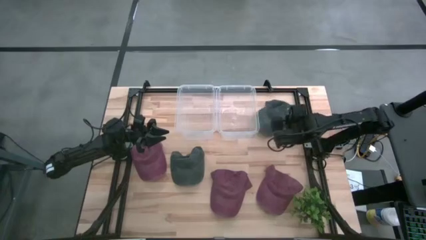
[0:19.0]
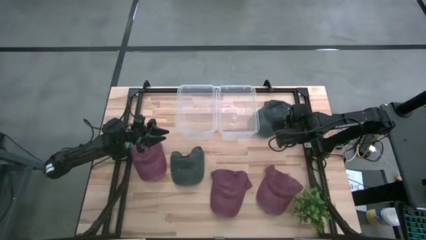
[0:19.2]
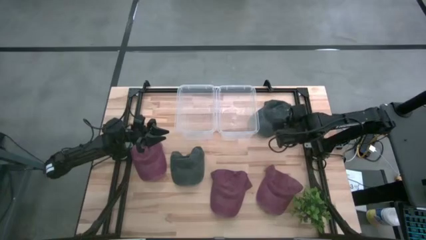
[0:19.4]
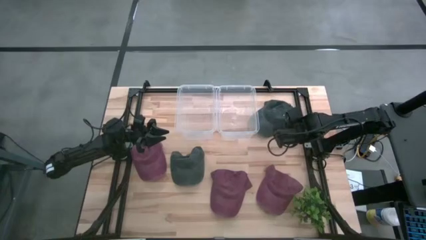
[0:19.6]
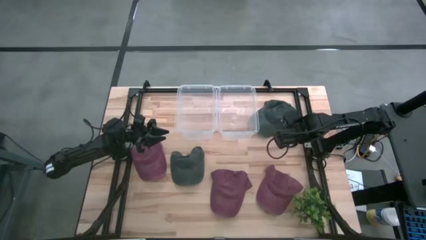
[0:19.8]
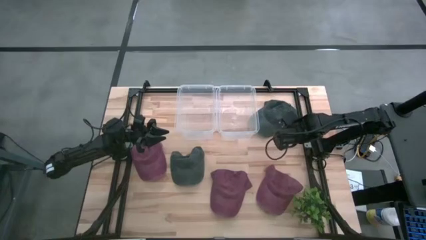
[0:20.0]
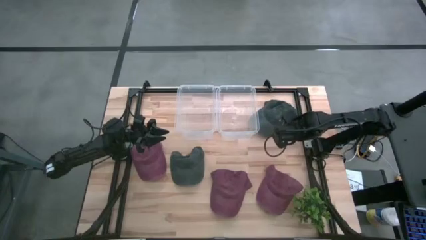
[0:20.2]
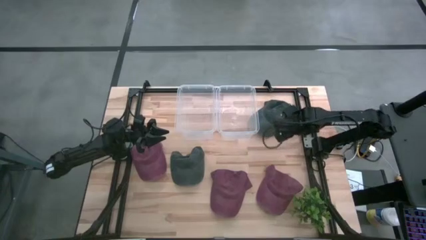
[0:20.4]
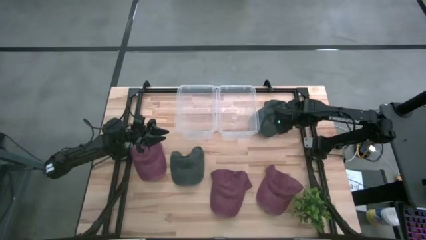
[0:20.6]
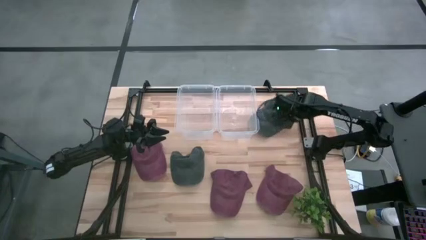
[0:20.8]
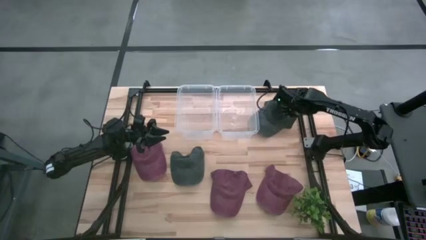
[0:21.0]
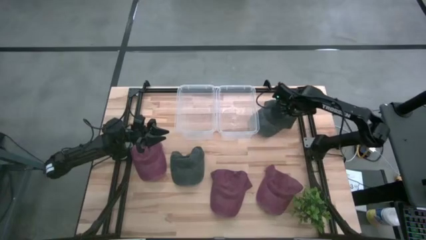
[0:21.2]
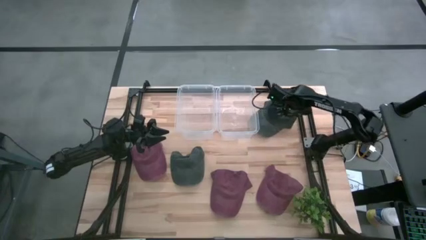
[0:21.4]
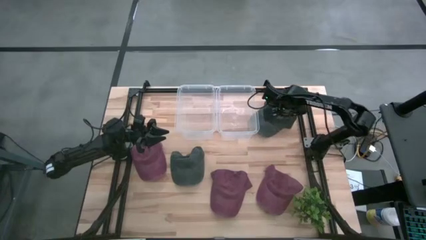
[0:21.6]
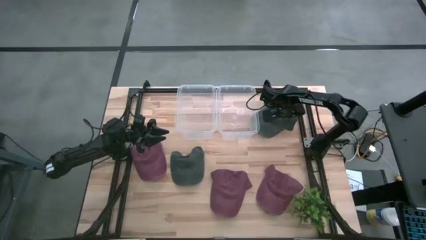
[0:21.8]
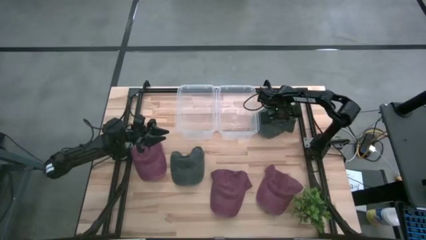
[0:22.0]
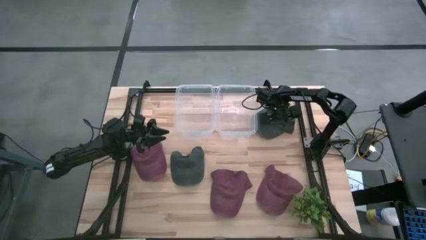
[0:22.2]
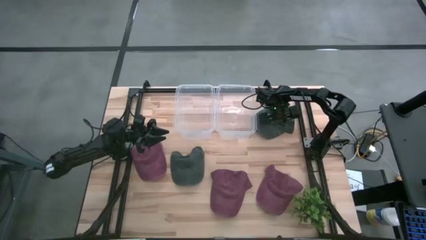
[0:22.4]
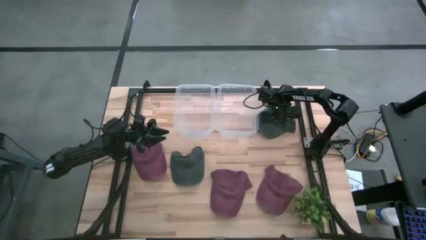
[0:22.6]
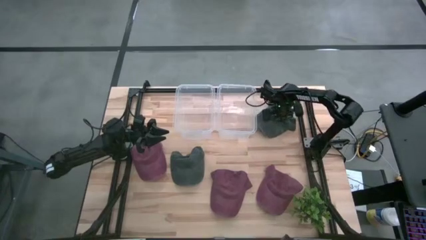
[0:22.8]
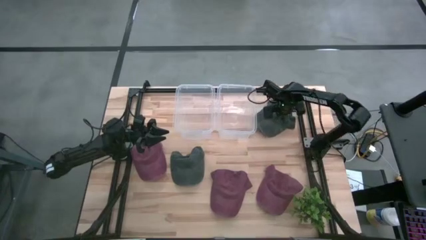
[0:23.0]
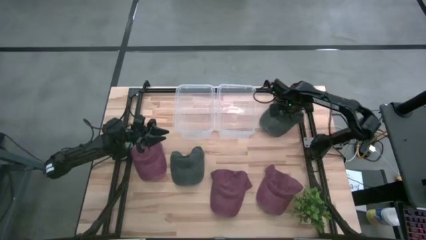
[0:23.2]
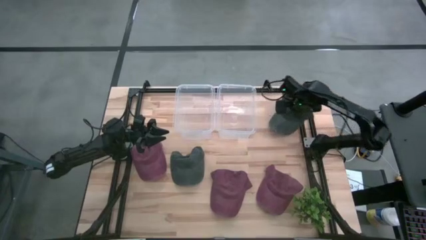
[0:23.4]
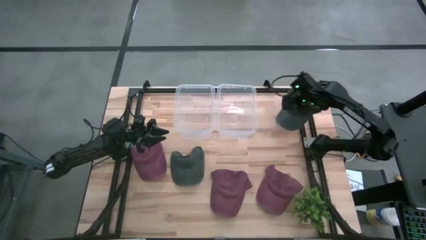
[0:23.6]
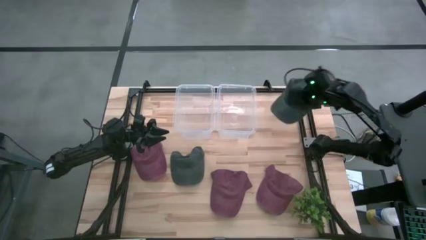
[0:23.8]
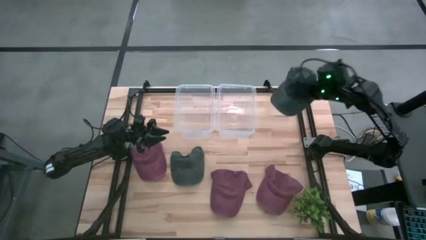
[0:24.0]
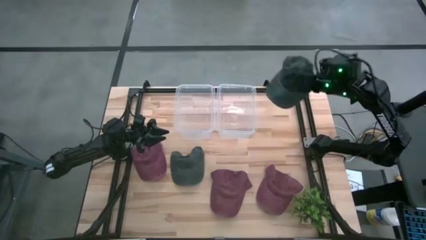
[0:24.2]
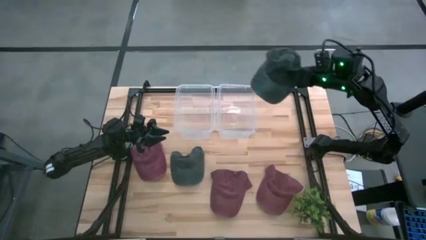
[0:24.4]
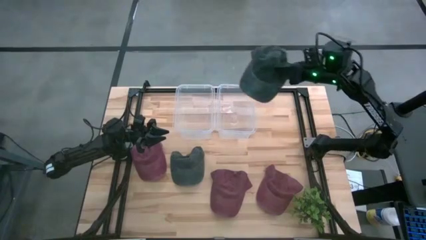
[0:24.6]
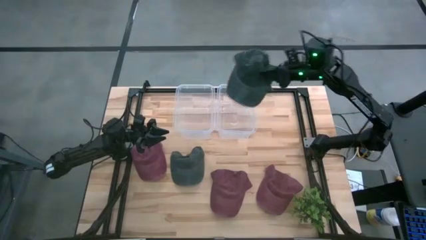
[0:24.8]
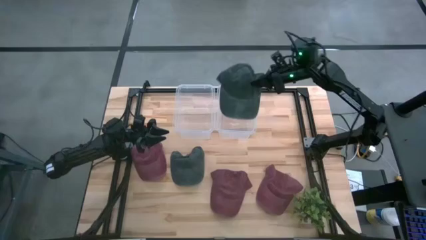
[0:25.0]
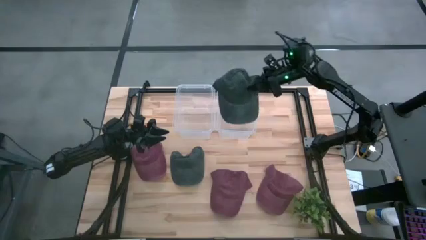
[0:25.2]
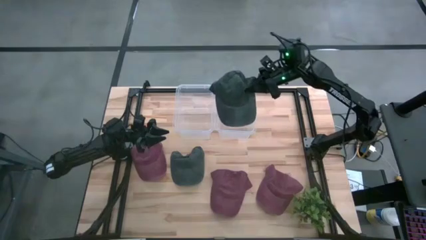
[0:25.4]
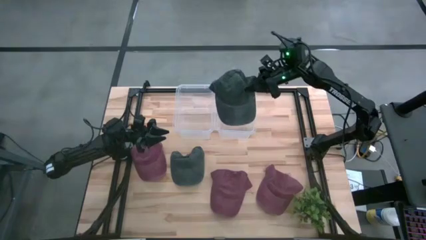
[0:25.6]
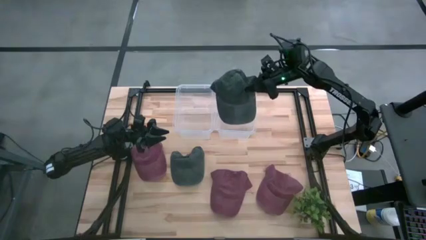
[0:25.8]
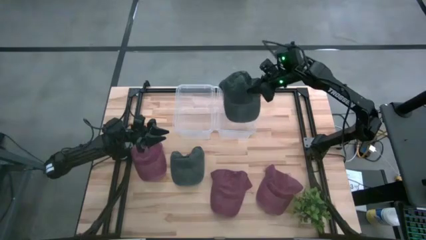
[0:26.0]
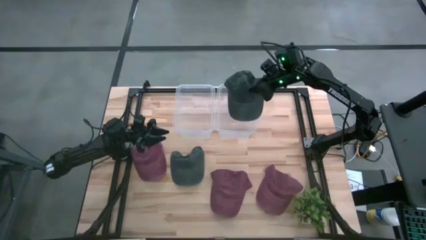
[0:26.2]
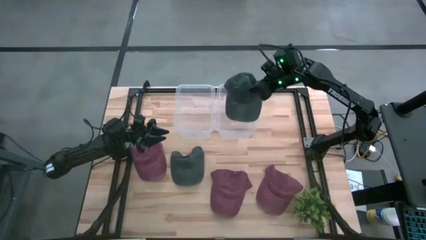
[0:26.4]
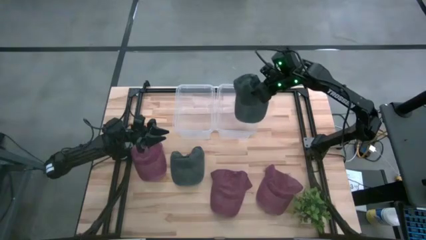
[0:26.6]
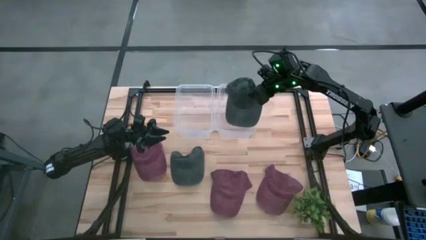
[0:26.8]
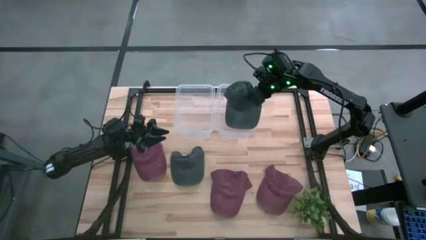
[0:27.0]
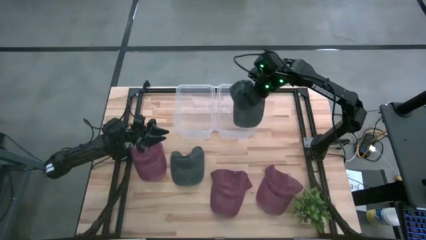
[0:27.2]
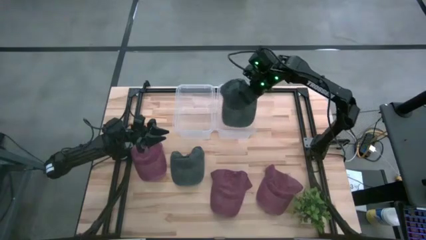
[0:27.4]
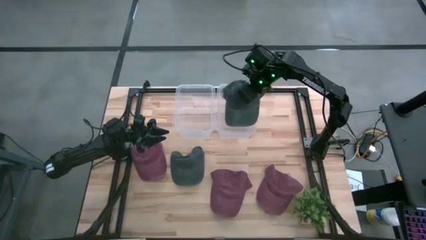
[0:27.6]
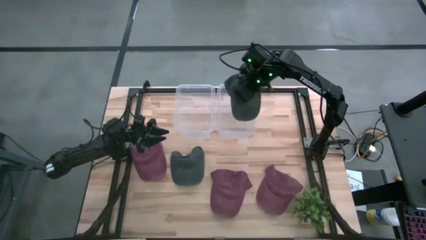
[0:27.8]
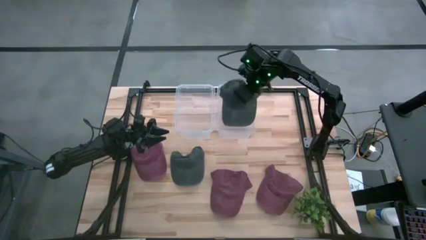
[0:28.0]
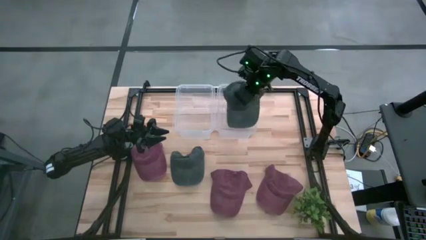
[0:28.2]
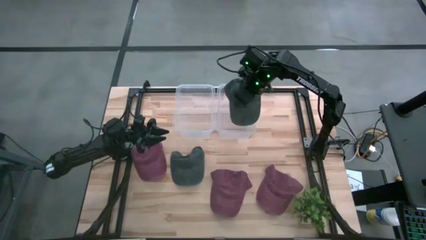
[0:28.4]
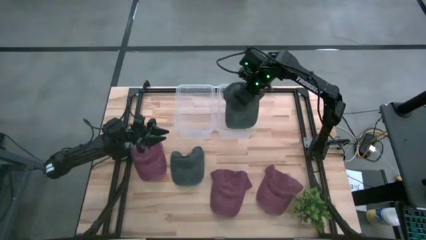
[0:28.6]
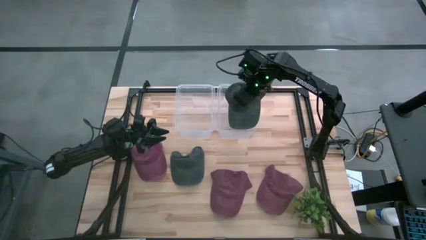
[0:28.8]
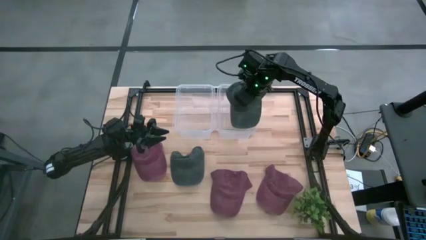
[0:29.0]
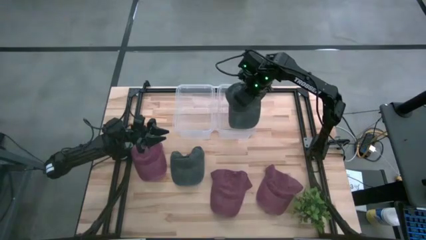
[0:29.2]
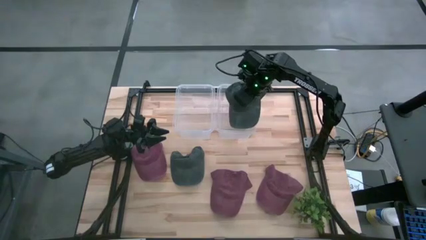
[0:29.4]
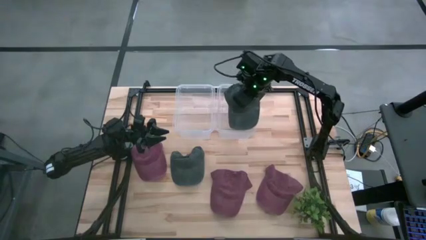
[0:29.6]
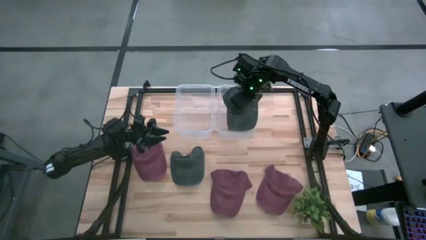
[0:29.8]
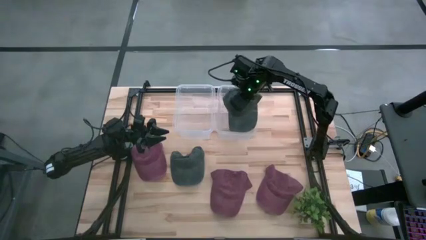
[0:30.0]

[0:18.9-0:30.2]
Task: Pick & Place hat
Put the top black cap into the right transparent bin

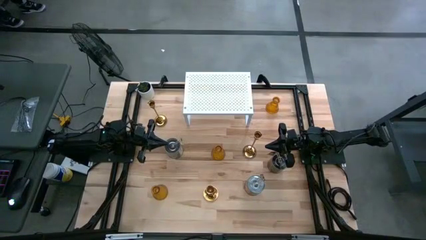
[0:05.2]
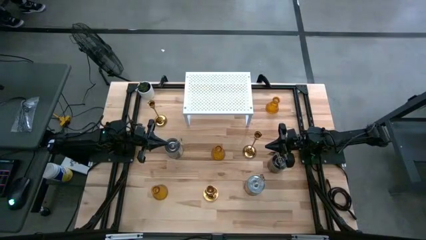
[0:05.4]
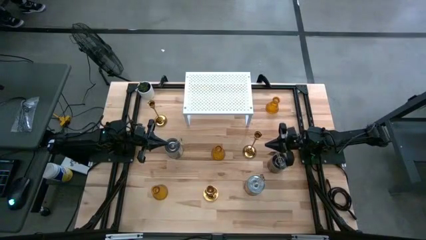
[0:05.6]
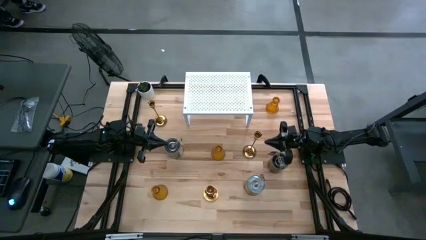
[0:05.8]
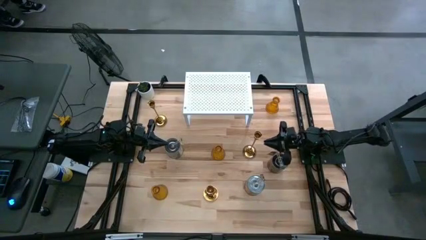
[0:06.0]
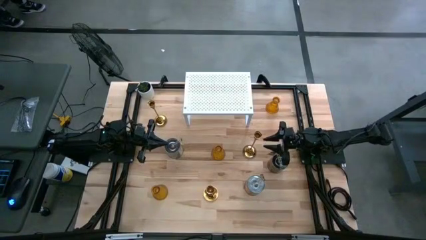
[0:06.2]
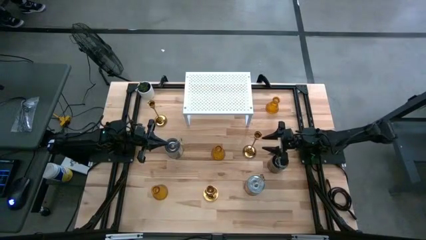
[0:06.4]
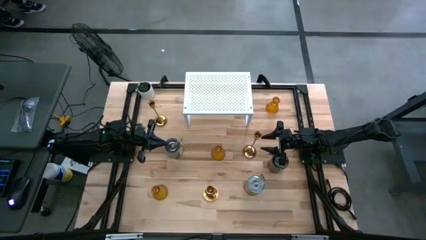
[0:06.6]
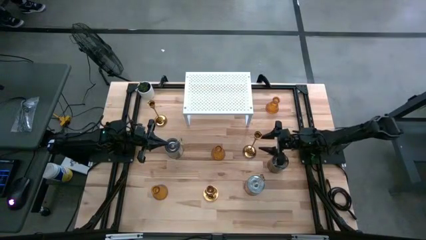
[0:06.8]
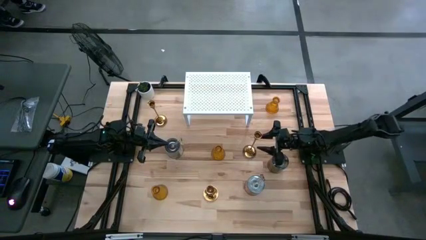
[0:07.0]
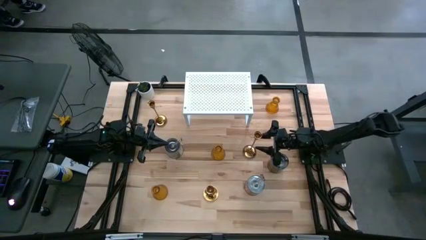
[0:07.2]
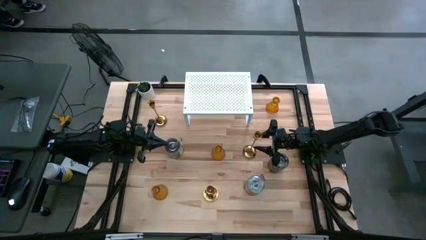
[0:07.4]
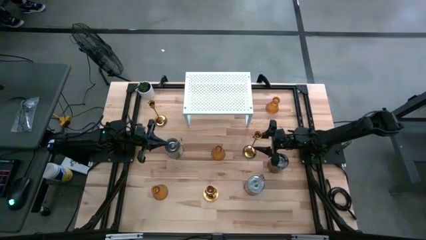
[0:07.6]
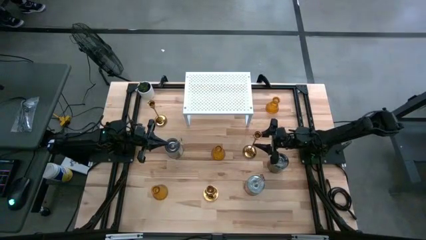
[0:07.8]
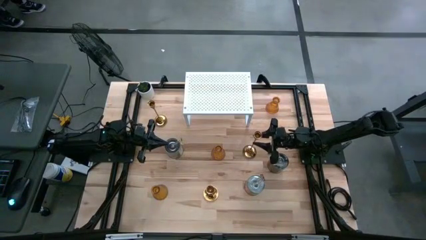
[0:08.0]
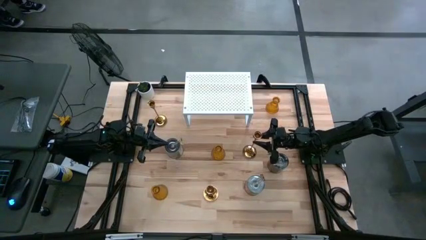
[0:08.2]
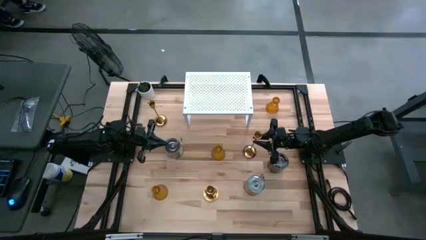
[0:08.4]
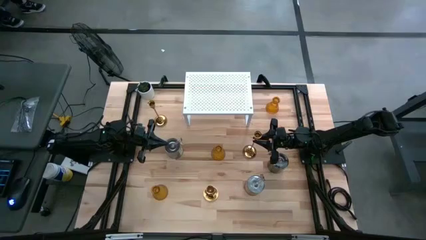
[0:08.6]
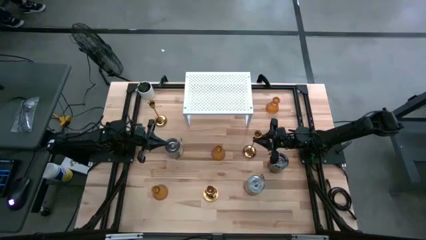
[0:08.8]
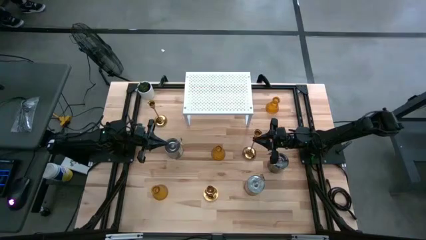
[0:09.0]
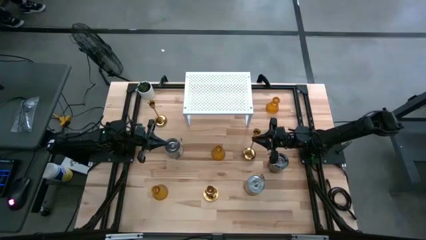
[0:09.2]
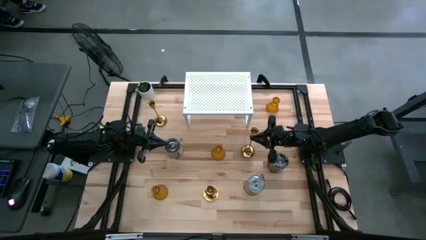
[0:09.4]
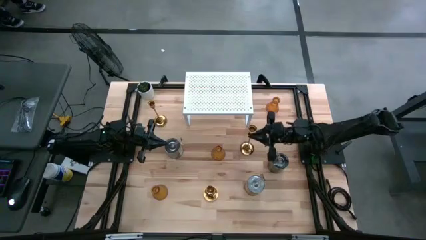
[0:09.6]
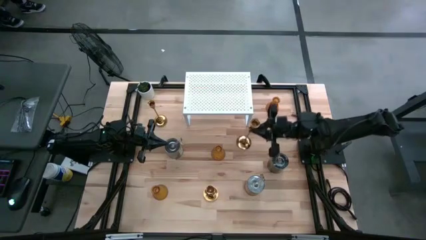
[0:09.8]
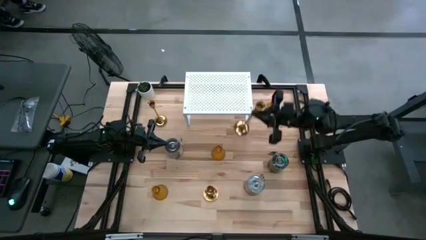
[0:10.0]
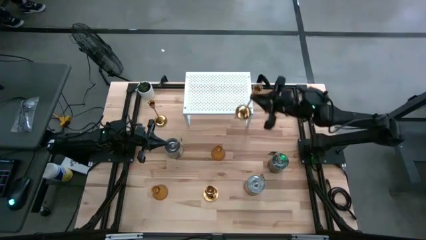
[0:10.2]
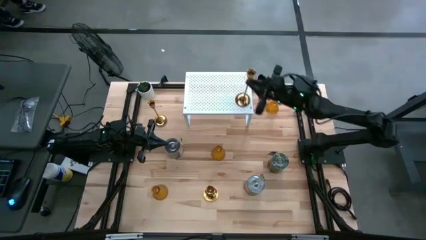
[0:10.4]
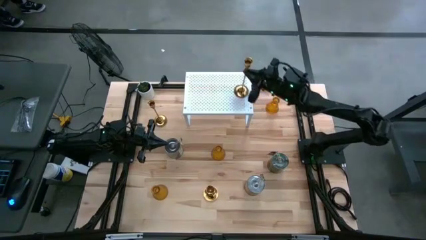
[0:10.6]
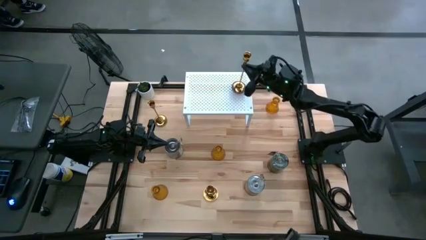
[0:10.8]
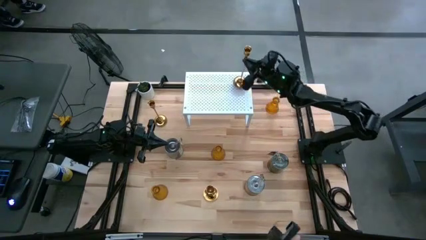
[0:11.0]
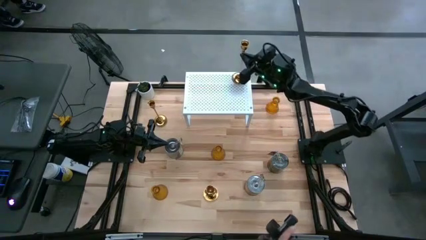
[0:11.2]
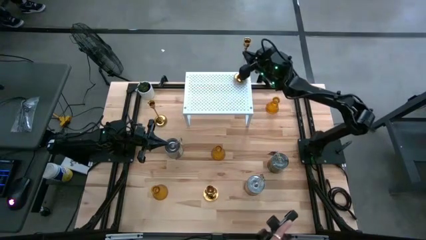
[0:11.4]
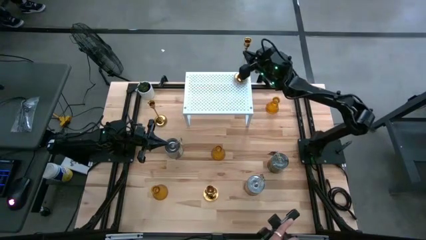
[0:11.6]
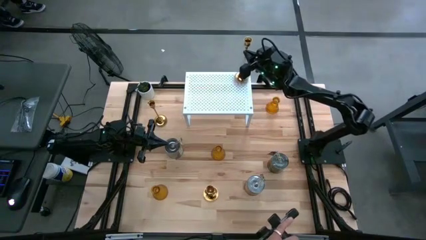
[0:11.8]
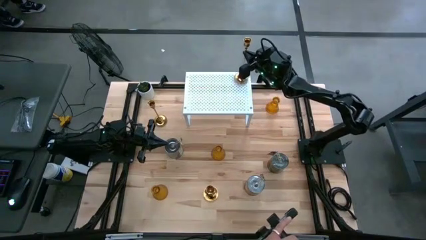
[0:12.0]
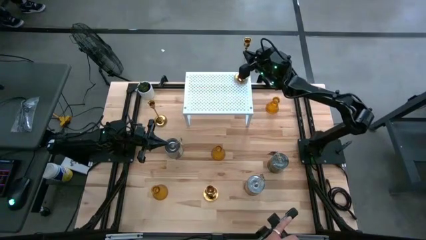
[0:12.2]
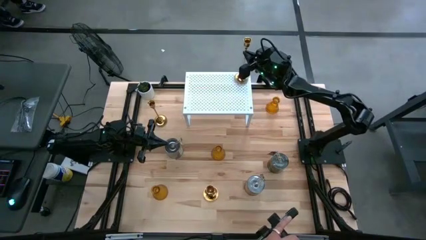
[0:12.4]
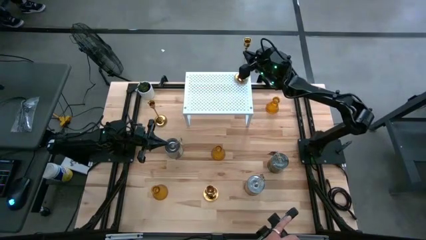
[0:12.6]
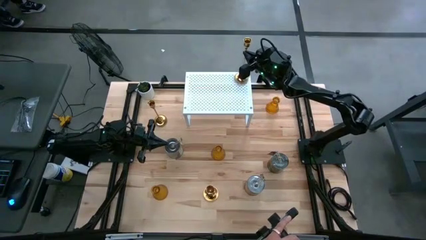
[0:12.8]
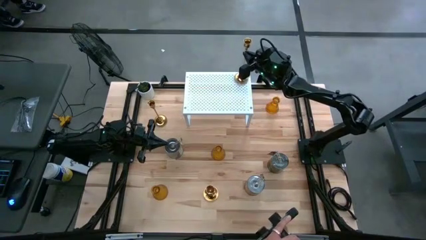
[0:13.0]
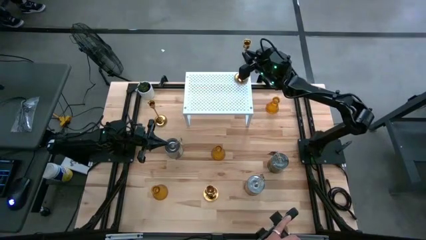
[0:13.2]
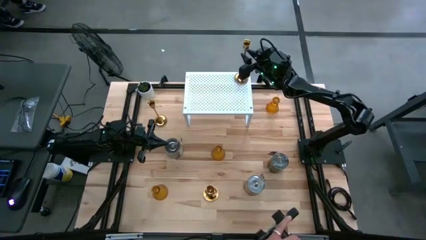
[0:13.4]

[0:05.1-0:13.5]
Task: Pick & Place candle stick holders
Put the middle gold candle holder on the shelf
